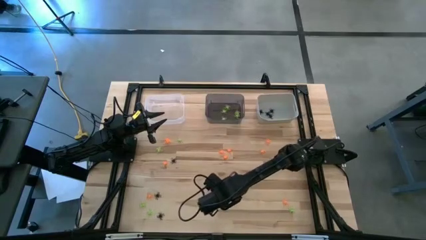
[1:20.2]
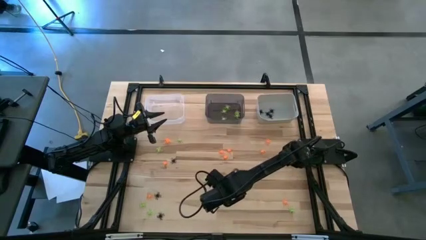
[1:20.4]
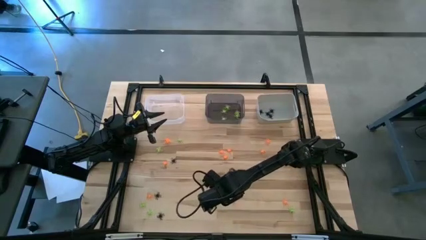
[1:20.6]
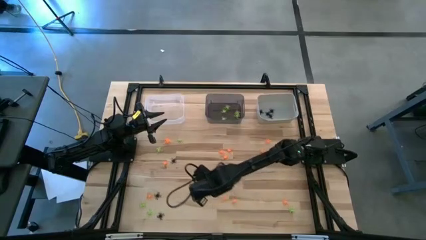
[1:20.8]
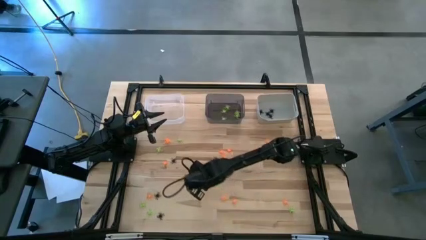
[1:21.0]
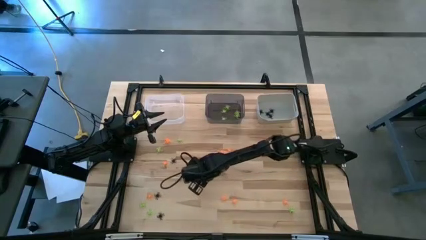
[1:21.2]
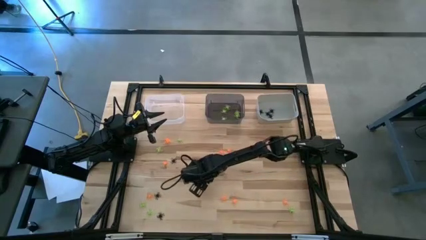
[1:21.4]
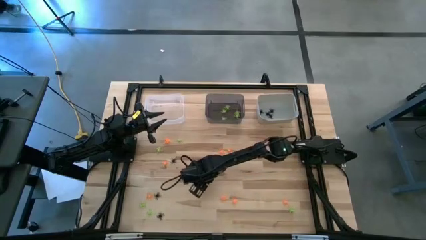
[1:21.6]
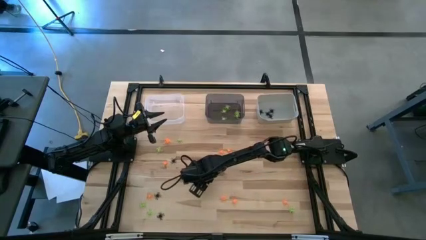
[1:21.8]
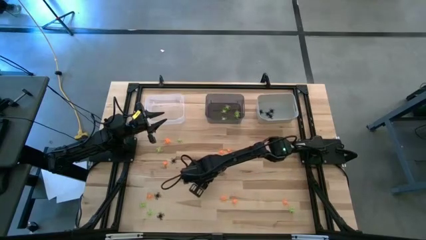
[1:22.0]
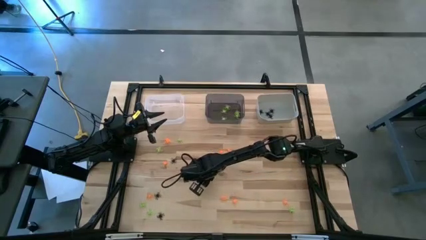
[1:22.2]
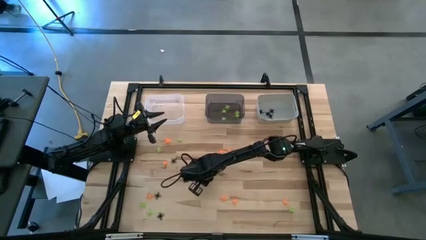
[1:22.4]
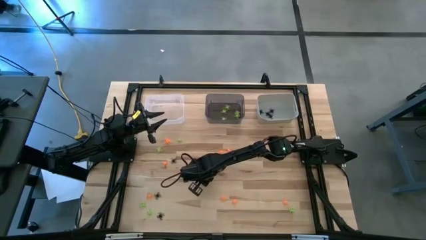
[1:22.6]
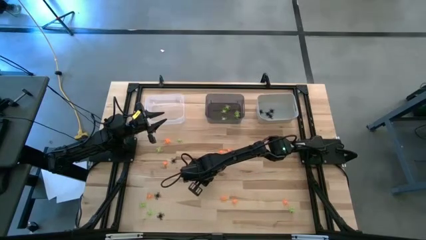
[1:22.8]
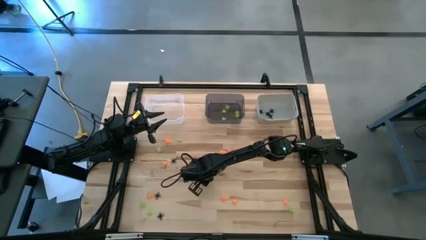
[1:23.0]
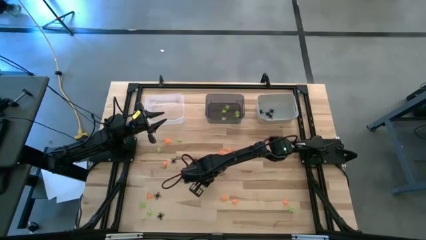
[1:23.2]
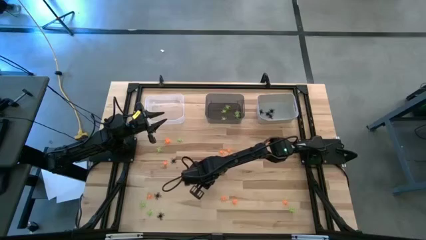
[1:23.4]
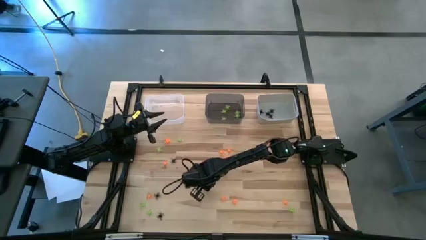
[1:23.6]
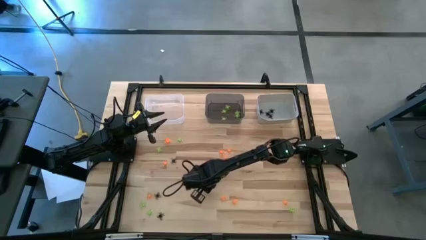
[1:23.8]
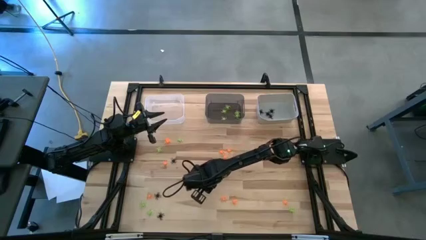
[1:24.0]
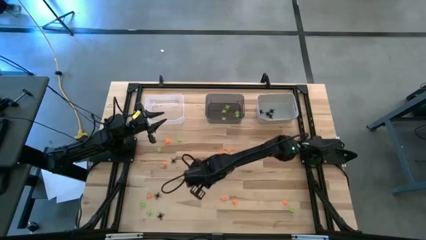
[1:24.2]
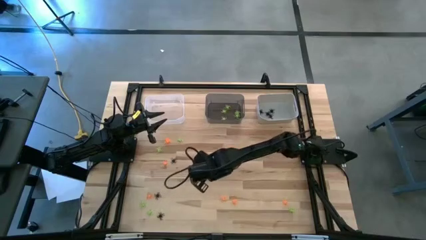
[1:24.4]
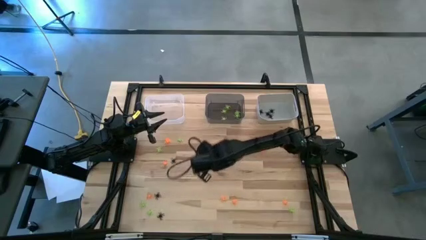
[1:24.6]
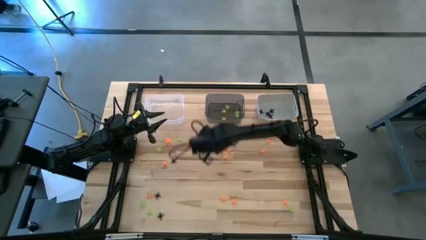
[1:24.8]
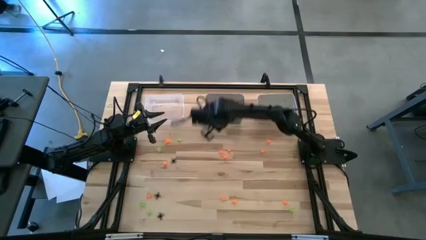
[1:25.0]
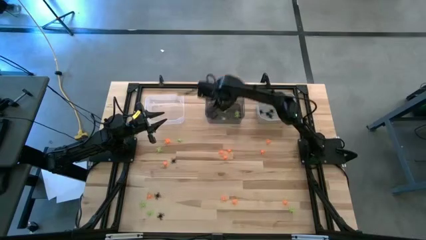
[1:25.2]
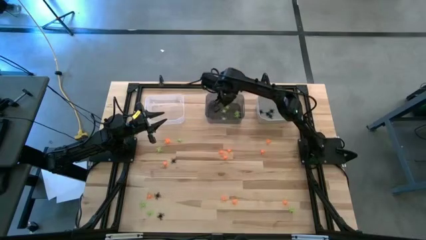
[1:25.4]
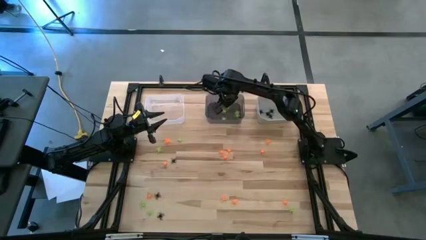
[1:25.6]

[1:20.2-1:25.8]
Task: Sort Halloween decoration
Put the green spider toy into the black bin

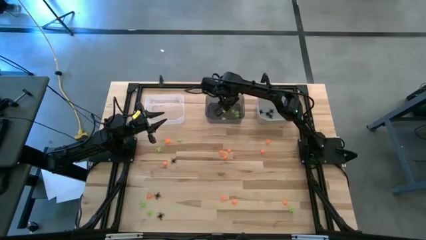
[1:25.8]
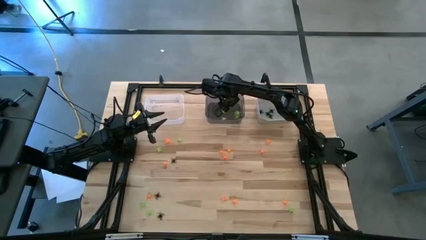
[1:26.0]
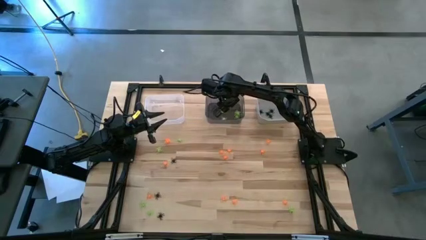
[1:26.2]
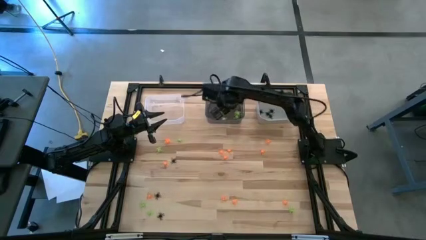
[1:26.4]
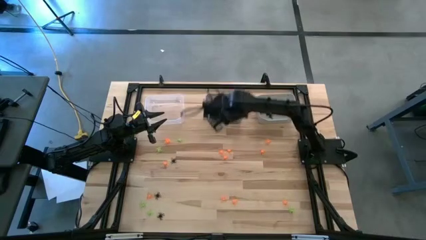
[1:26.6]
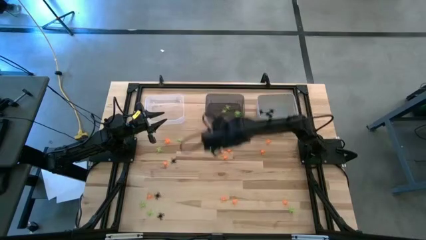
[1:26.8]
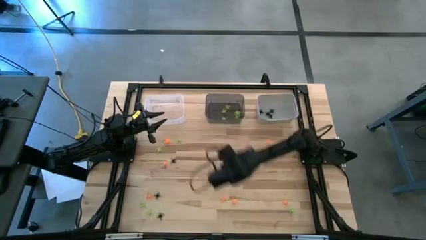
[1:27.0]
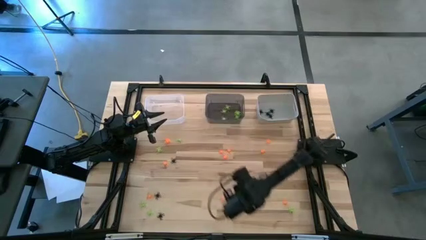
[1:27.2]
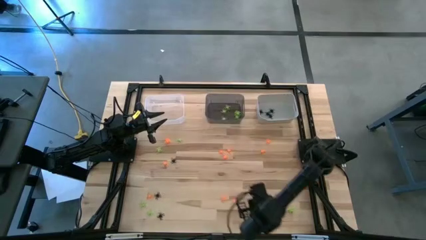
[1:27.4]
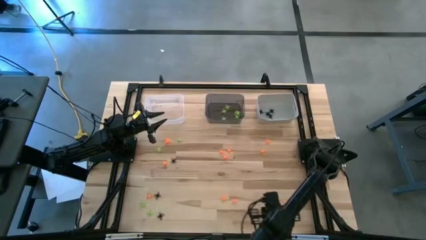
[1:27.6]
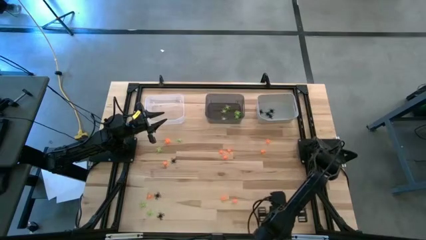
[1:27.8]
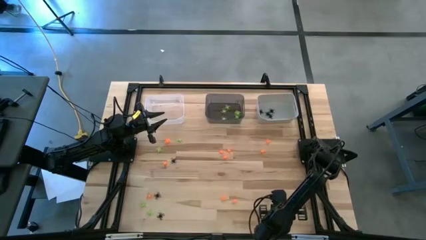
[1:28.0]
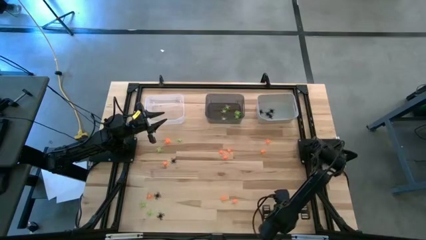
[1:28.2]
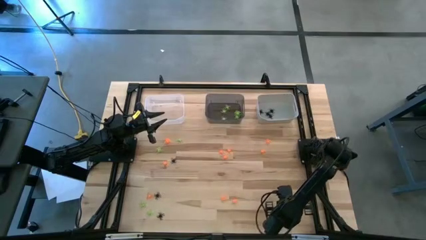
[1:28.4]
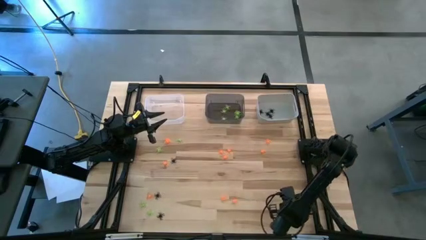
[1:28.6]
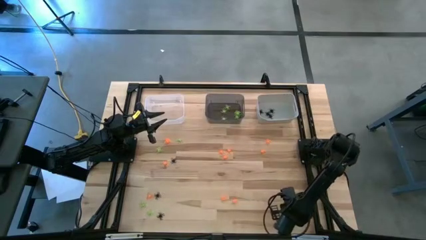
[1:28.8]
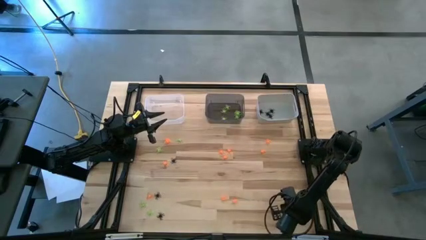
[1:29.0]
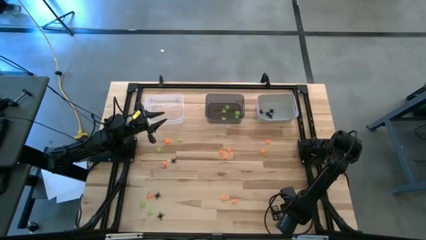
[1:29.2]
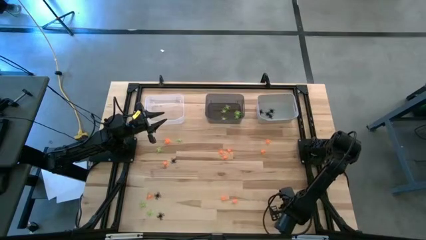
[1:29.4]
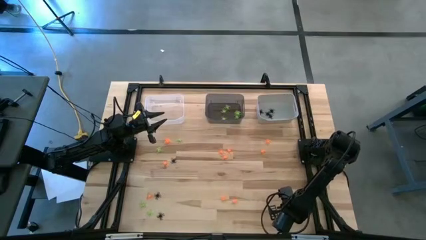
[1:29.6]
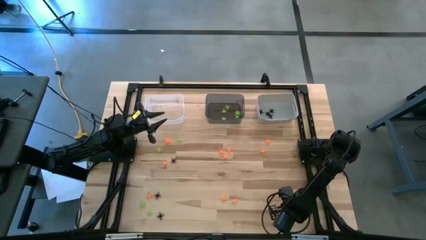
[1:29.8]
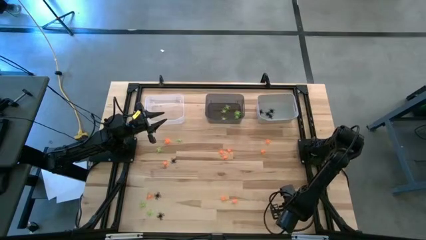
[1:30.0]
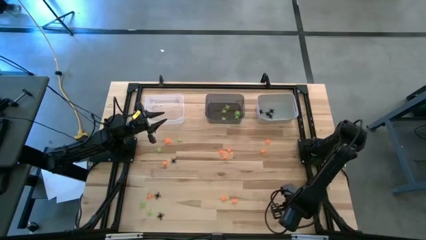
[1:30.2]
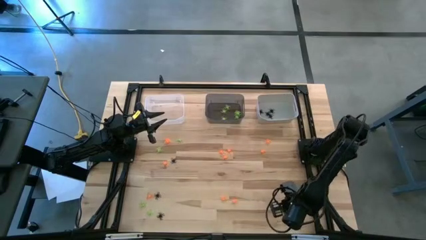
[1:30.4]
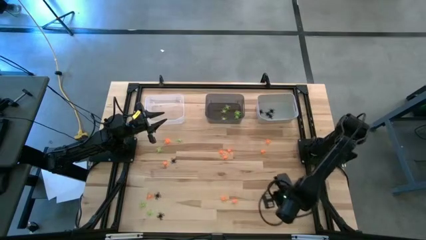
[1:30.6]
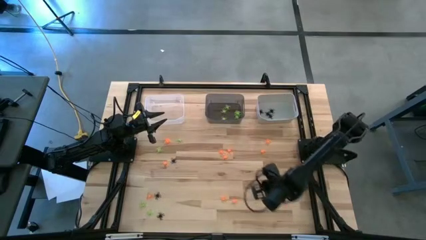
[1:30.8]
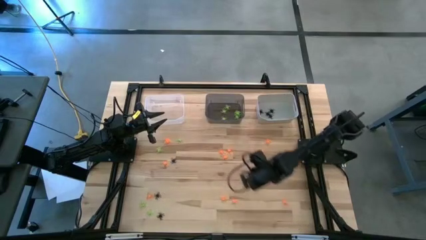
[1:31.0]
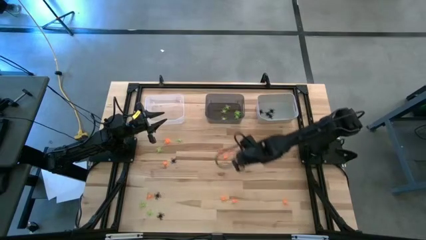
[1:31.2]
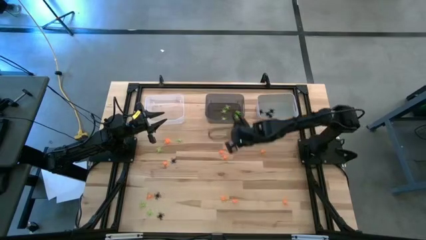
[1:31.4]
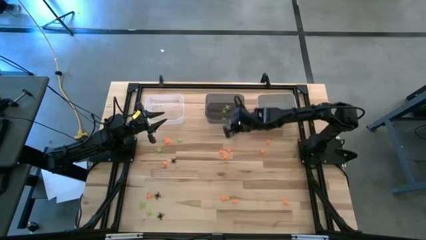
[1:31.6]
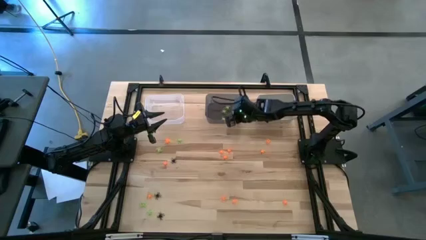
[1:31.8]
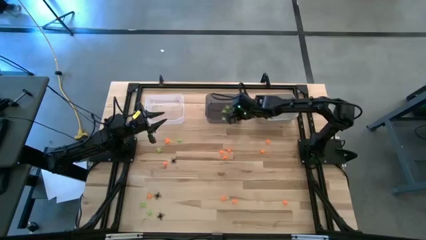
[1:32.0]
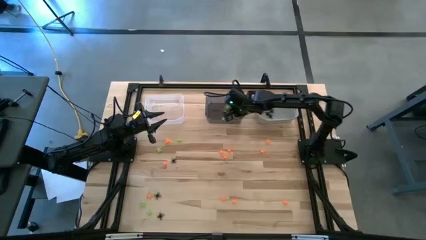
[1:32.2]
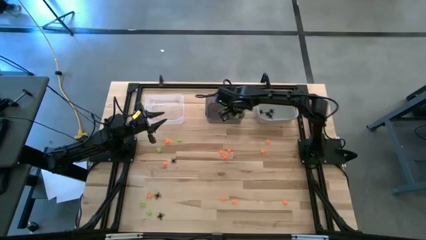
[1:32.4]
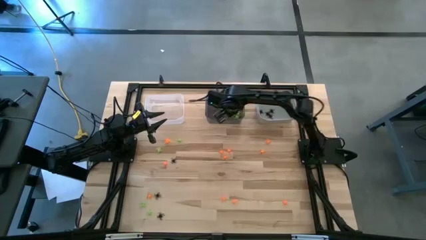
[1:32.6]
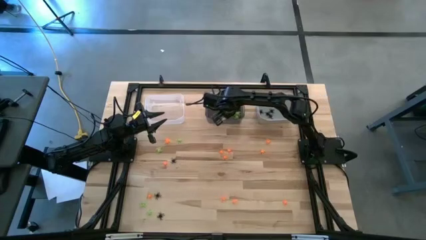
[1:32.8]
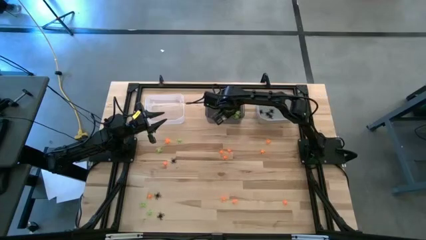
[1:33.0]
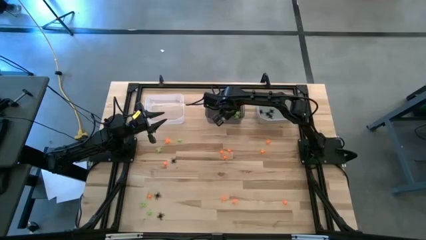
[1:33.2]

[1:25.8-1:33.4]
Put the green spider toy into the black bin

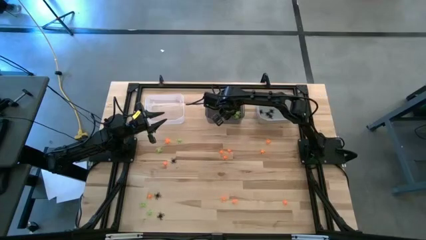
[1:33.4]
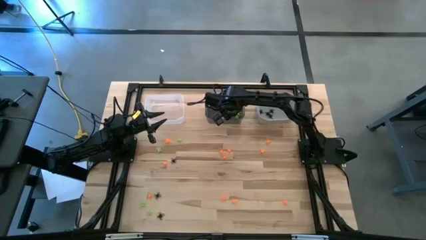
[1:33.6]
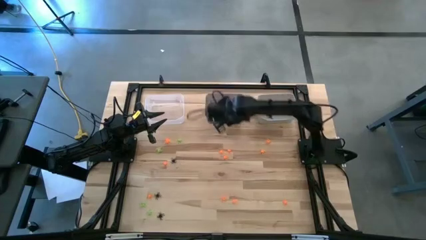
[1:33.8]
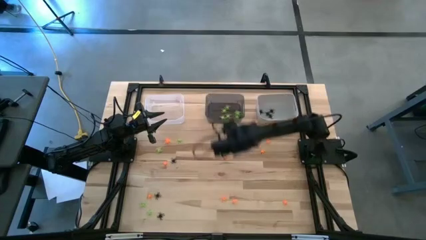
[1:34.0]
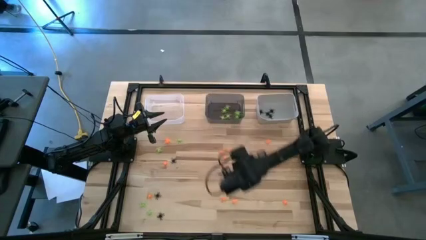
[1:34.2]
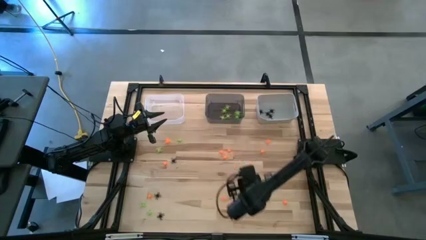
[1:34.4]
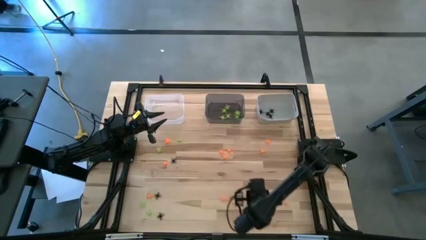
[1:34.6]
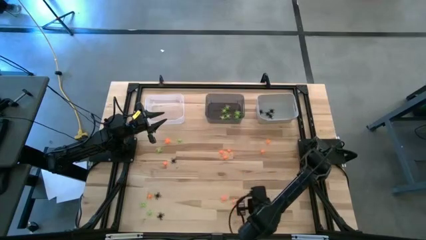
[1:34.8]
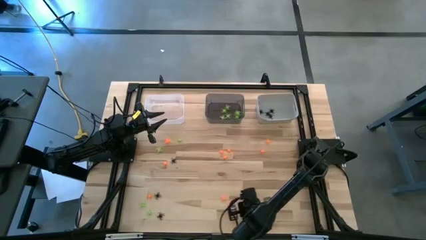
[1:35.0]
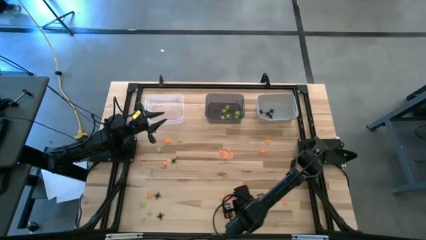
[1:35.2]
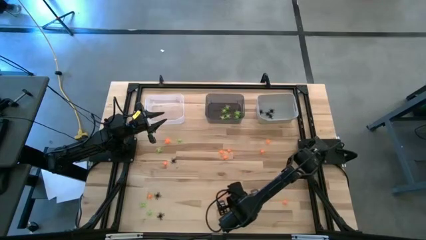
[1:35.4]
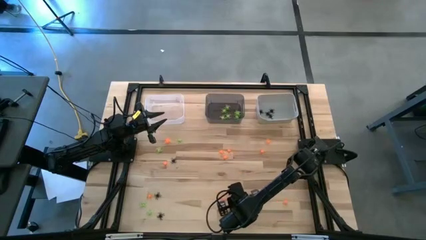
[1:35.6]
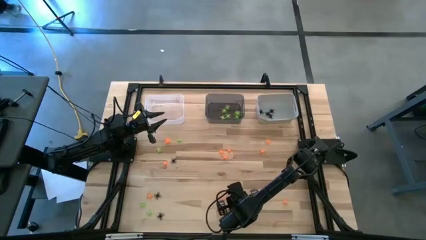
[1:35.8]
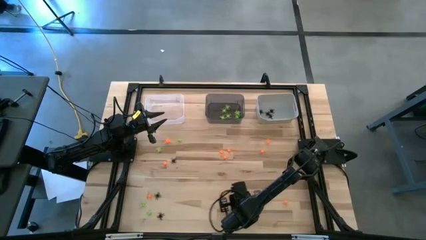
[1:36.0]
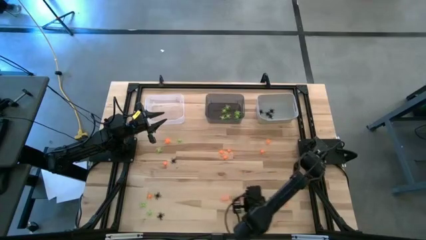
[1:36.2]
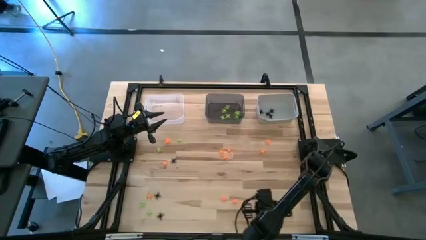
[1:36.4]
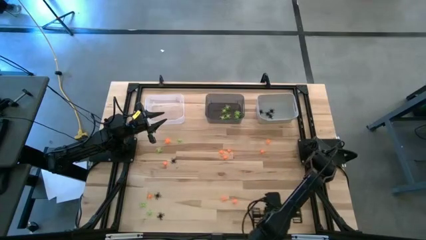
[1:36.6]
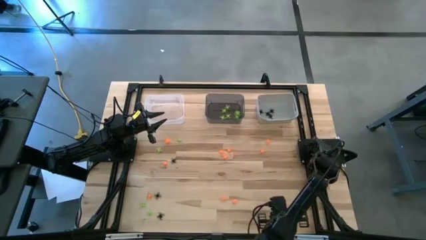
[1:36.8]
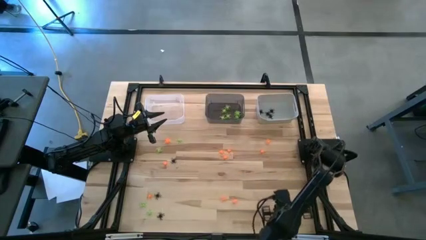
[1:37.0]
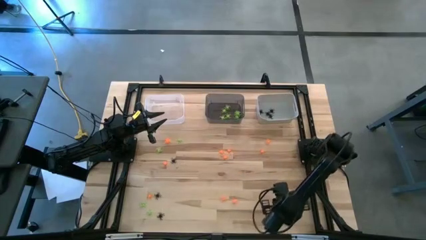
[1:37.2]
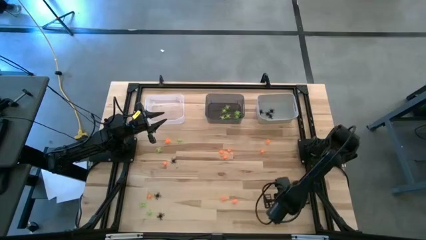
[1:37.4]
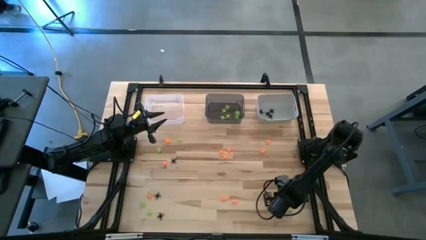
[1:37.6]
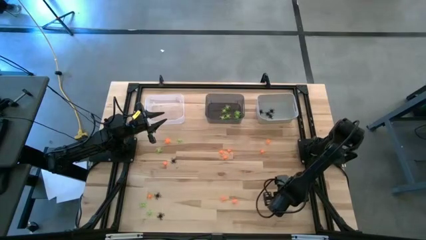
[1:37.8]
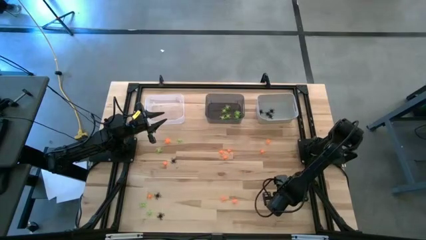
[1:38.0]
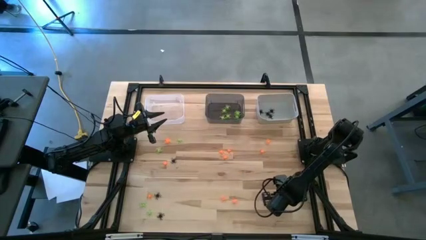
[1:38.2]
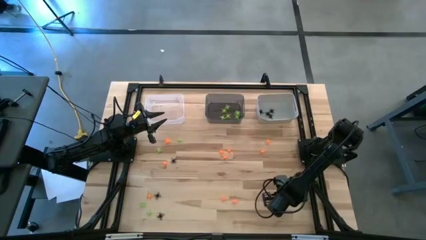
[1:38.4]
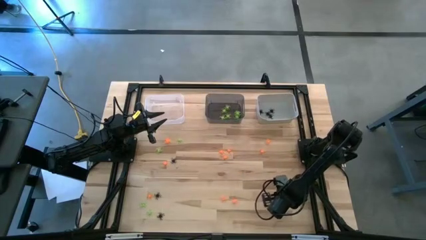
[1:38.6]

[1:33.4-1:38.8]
Put the orange spider toy into the transparent bin
